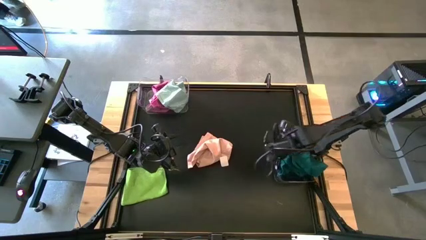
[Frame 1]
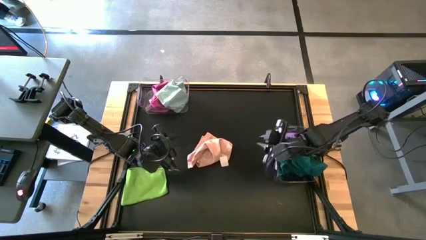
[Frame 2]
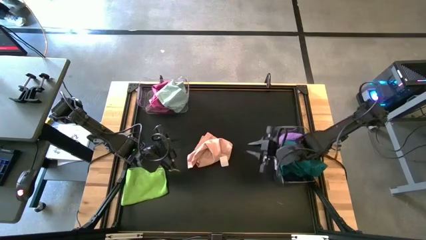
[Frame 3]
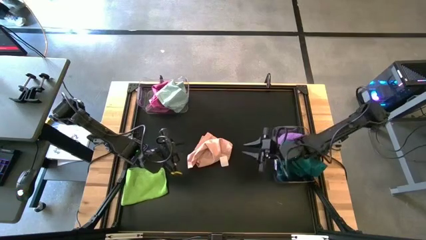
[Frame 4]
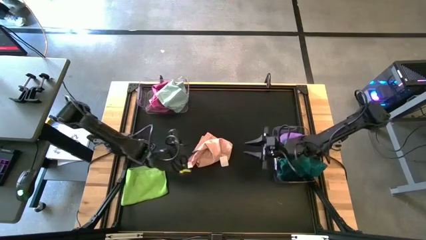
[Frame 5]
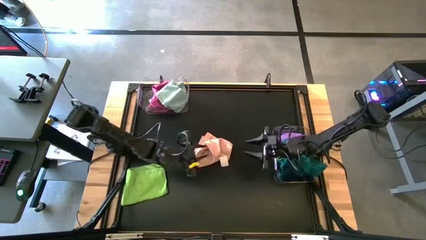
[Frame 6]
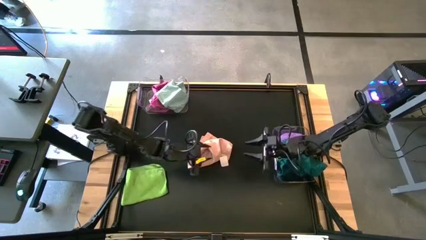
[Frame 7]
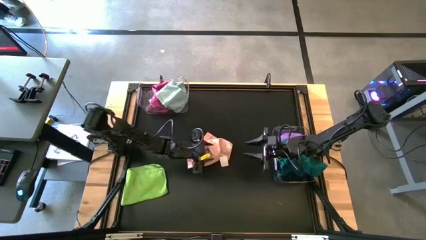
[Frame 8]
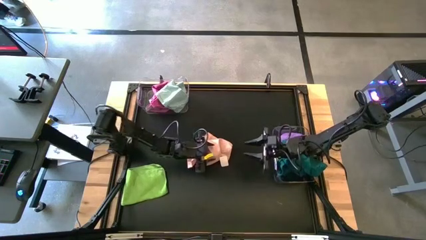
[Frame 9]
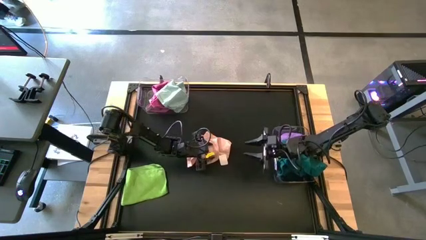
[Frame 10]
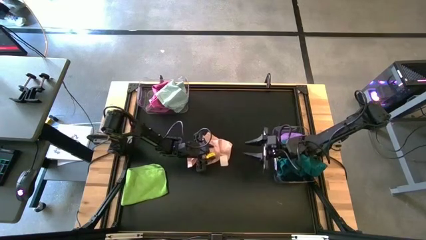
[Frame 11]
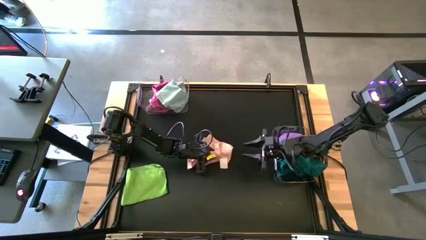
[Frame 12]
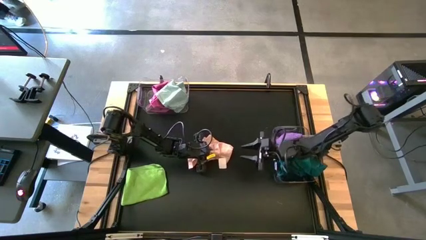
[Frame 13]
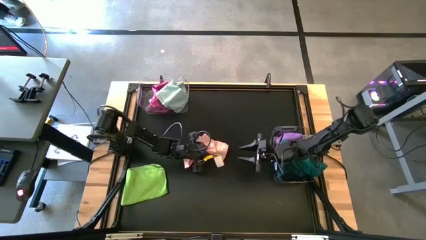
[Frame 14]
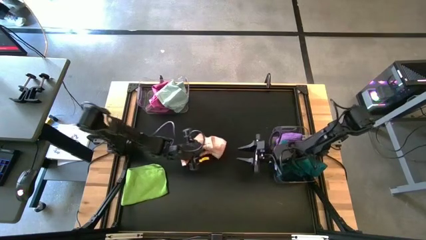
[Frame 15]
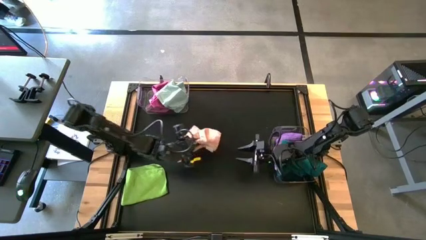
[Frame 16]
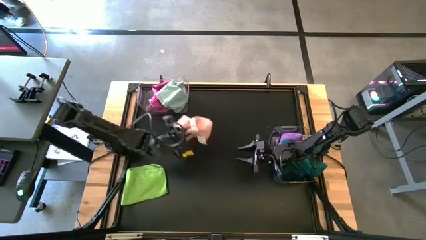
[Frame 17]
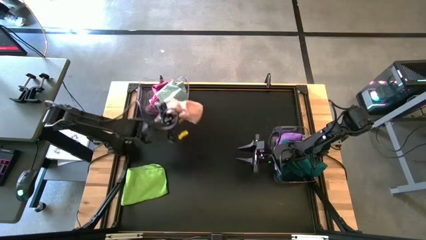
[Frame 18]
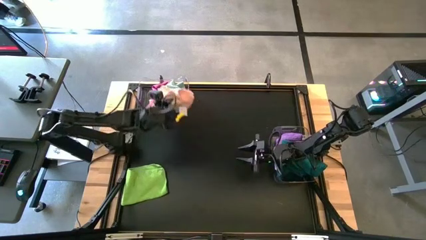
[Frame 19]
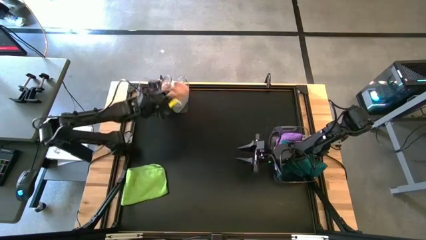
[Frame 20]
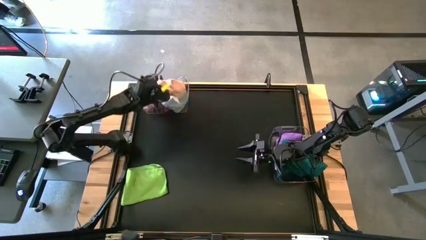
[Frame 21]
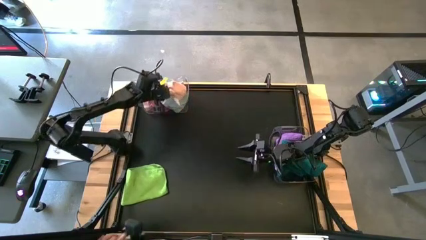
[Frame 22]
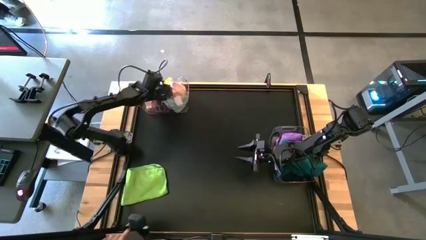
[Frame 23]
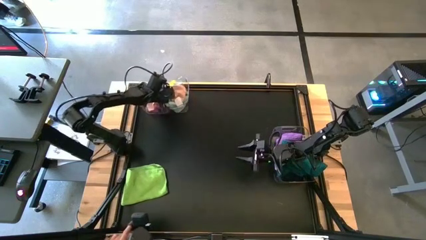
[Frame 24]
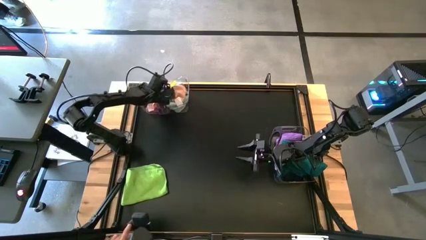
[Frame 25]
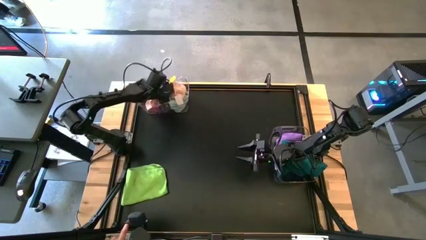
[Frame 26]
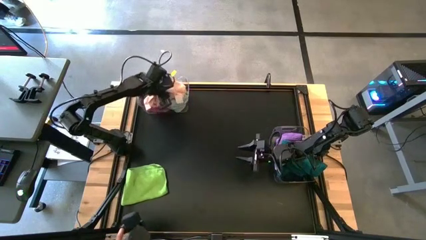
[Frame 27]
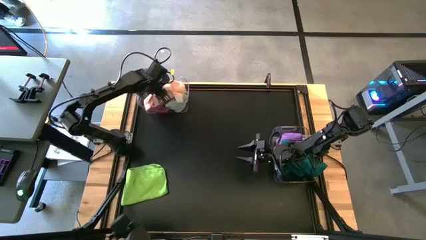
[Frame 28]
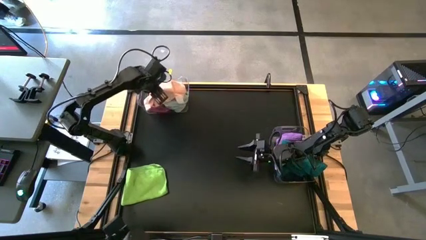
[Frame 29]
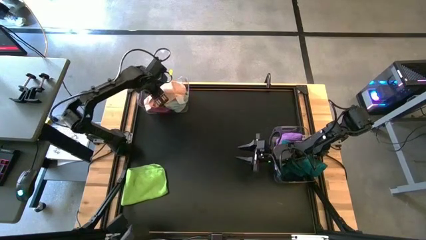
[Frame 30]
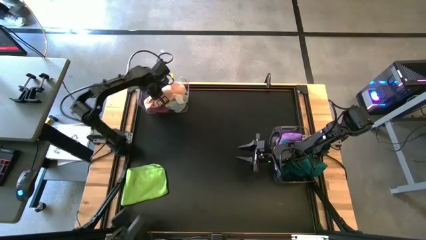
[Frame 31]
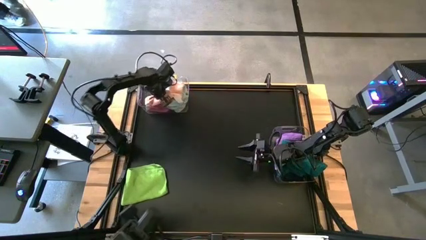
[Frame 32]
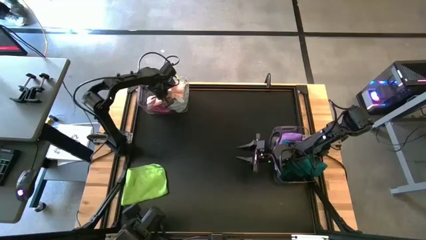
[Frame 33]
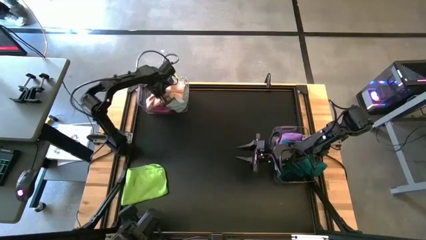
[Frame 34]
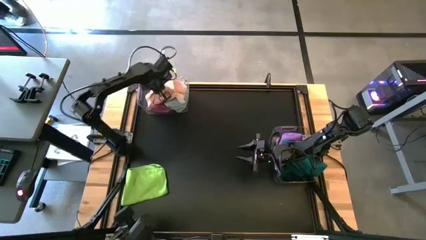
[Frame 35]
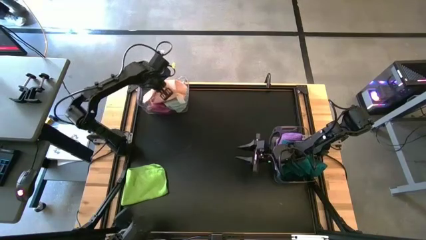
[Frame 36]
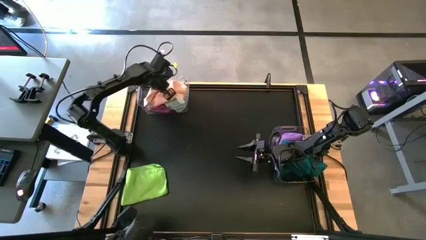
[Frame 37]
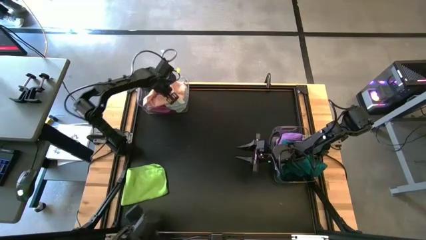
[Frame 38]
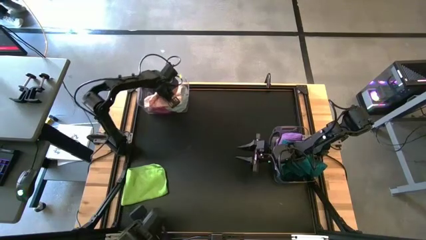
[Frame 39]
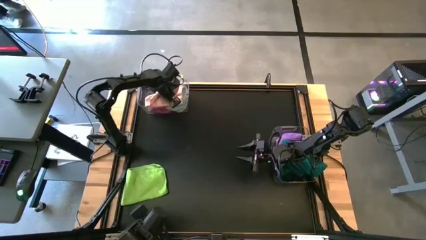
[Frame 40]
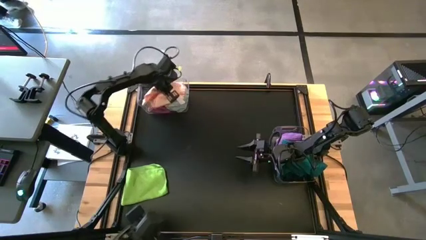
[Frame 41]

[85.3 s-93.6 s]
Task: Sort towels by color in basket
Put the light orange towel into the top transparent bin

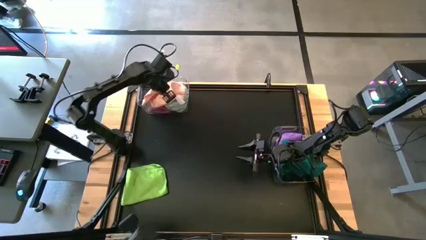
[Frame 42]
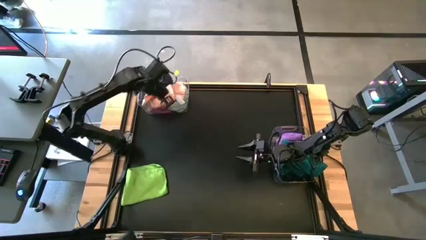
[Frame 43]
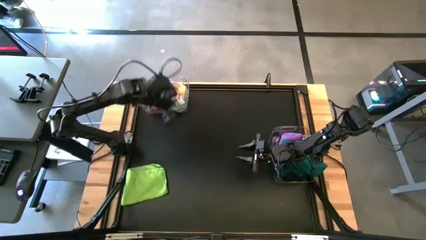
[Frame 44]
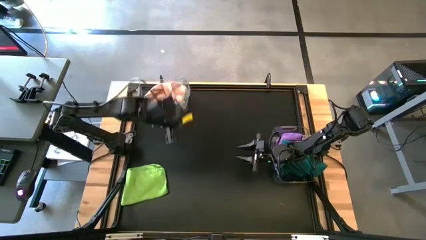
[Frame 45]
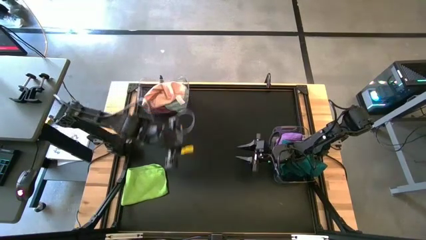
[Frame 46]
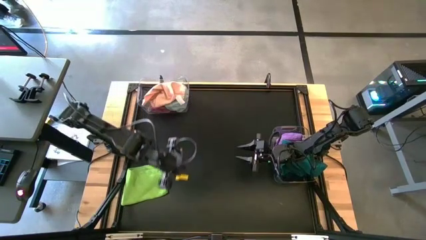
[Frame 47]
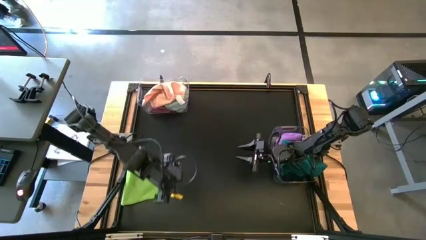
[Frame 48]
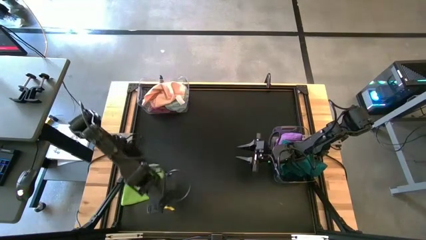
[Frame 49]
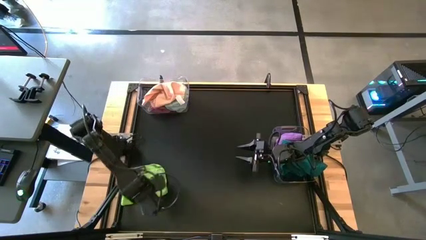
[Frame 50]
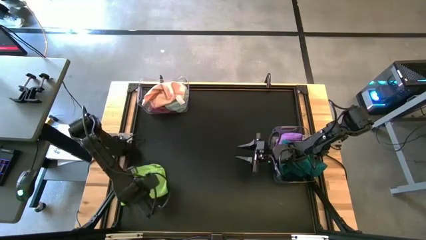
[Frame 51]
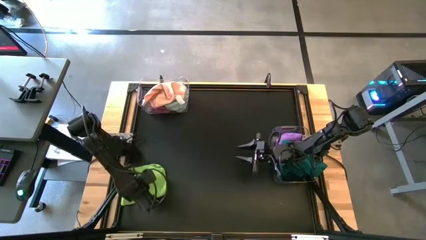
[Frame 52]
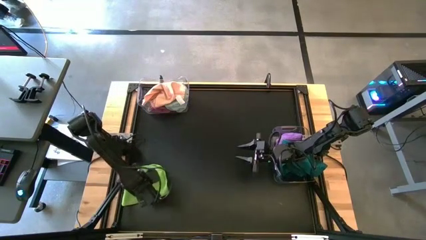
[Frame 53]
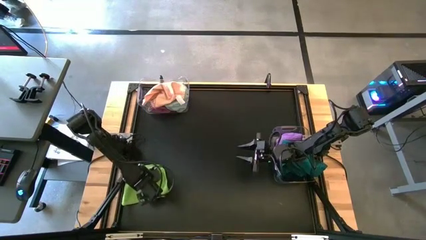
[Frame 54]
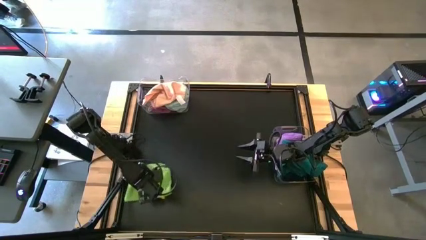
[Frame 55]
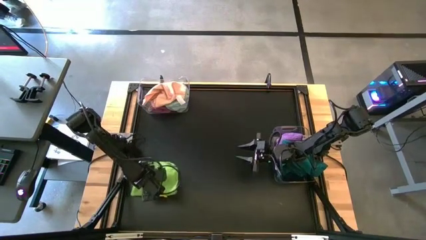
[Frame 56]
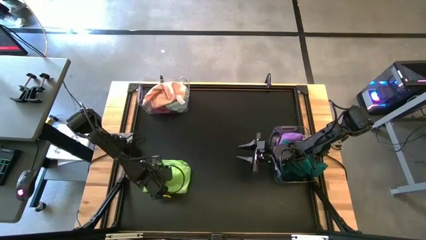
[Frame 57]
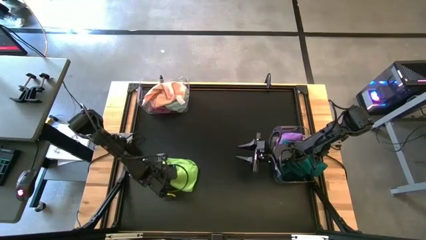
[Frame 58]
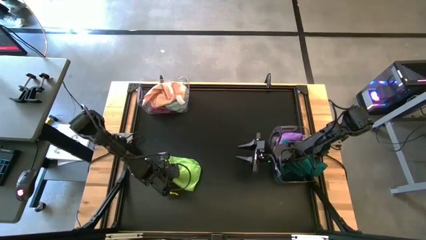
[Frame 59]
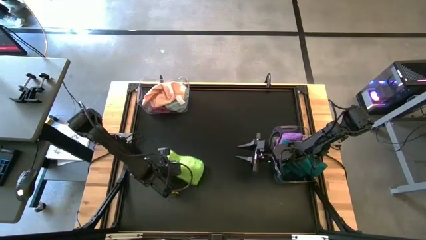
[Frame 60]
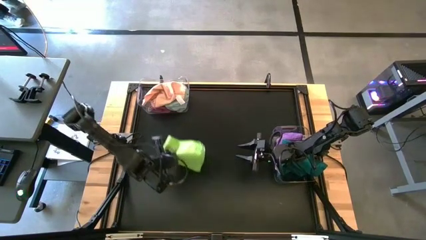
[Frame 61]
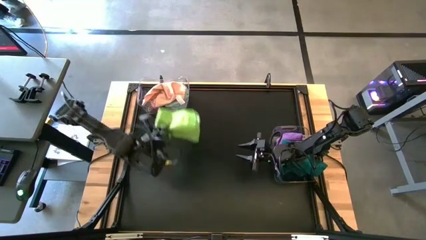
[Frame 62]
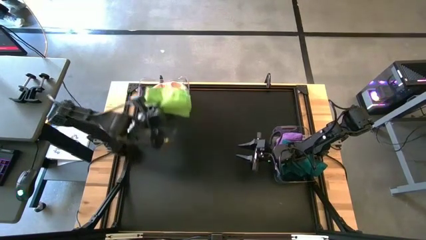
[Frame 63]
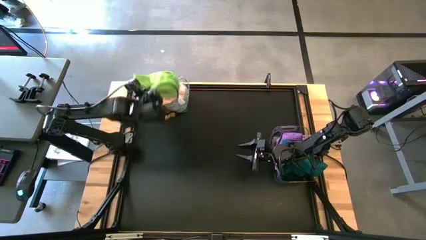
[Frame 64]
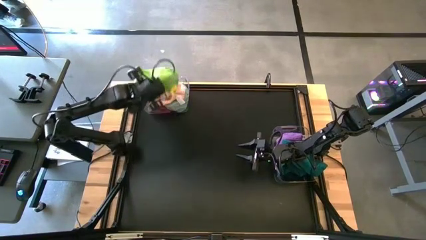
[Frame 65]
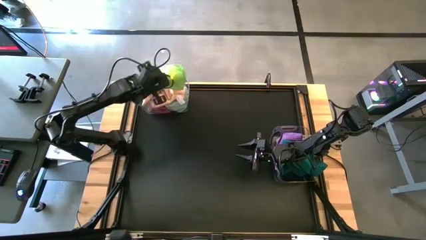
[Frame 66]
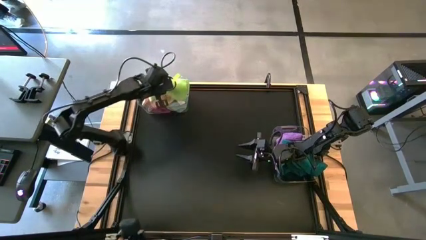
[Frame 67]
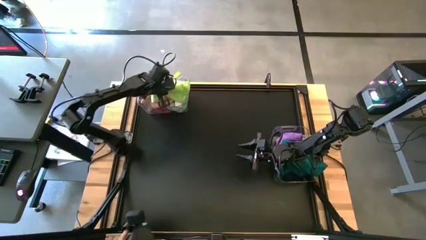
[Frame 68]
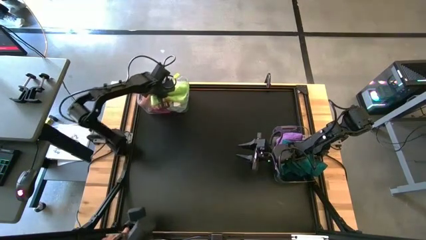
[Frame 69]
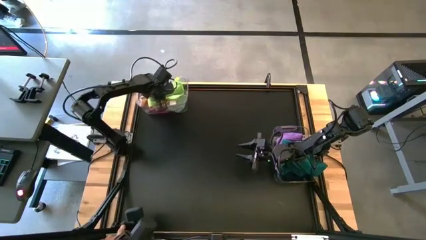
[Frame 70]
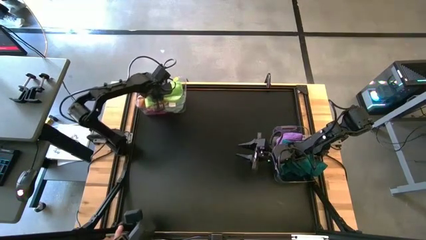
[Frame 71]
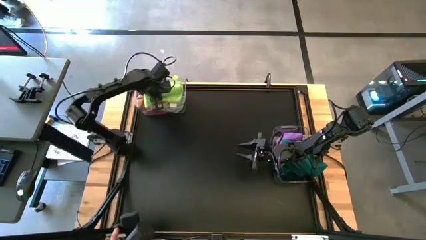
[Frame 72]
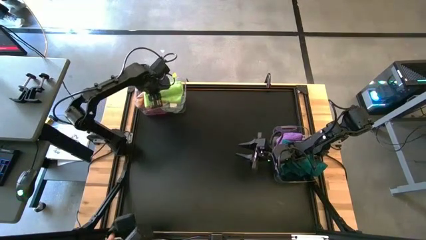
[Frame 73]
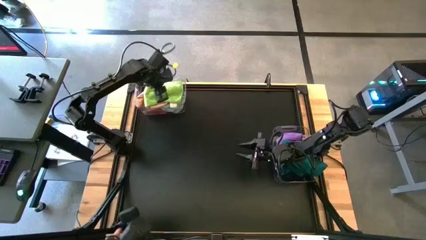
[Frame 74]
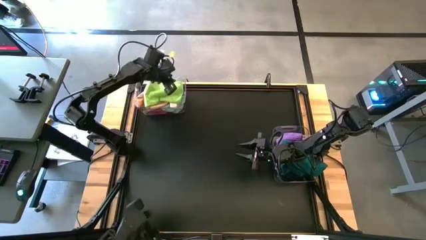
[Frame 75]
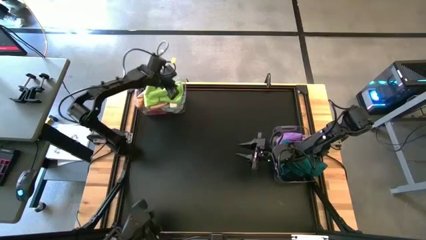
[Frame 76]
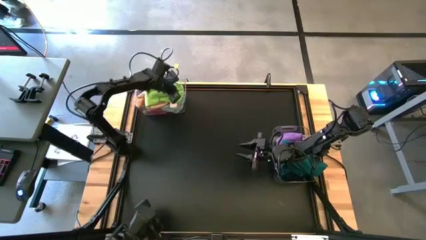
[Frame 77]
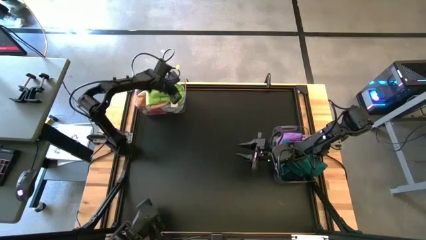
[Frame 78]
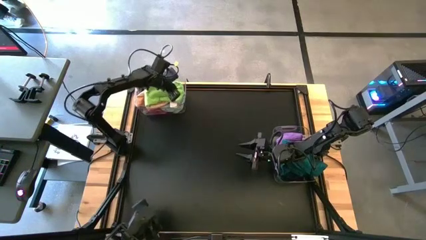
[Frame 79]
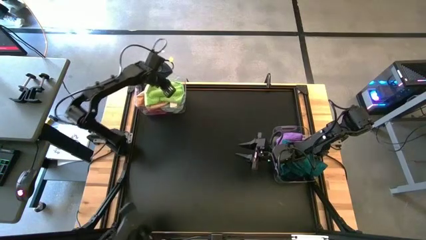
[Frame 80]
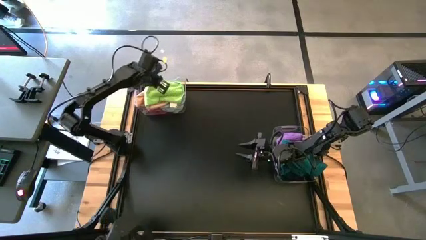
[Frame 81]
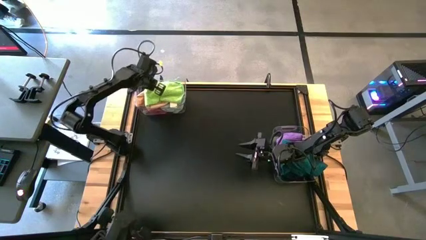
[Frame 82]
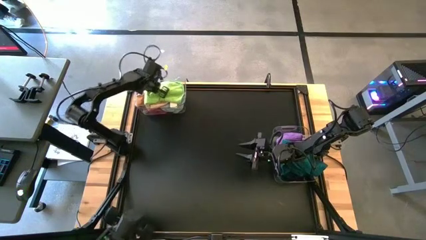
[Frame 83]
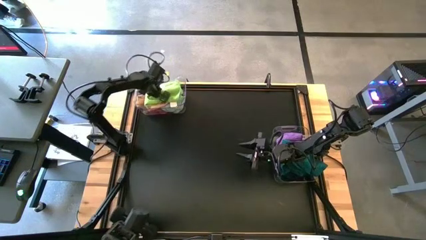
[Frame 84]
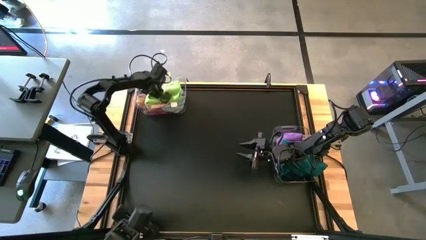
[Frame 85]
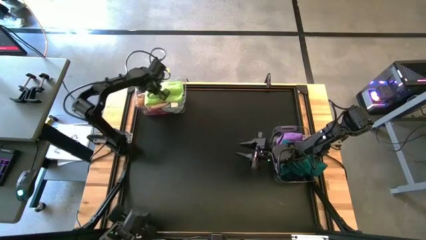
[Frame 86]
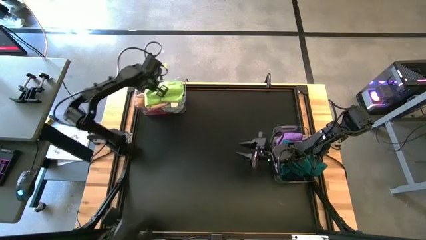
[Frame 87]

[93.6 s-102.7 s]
Put the green towel into the top transparent bin
